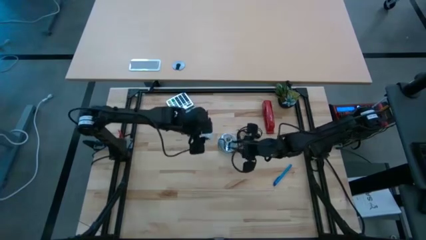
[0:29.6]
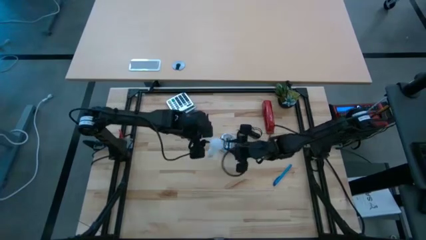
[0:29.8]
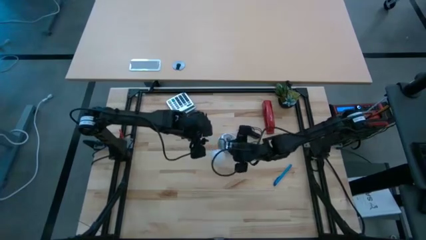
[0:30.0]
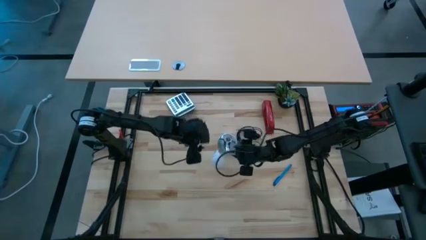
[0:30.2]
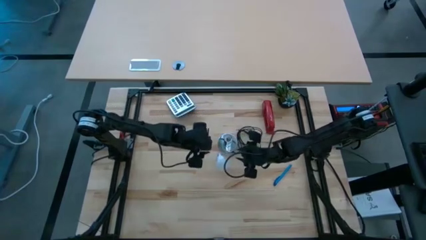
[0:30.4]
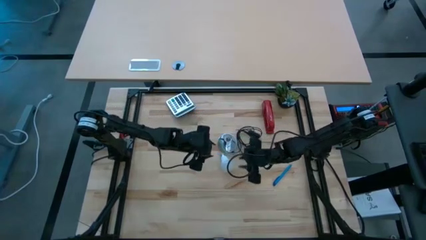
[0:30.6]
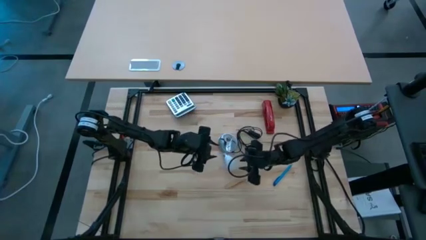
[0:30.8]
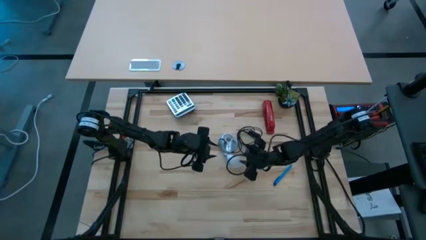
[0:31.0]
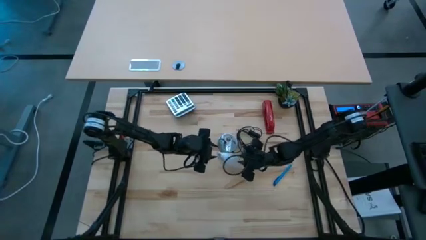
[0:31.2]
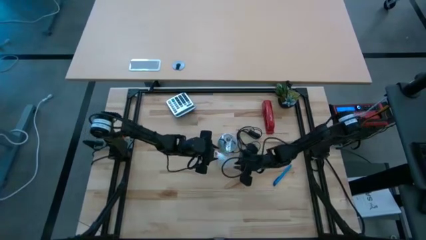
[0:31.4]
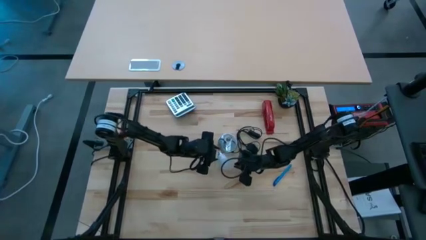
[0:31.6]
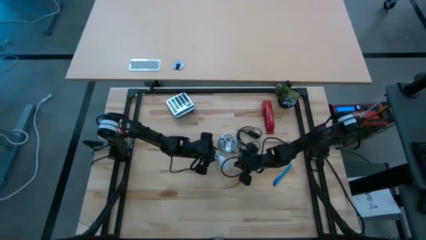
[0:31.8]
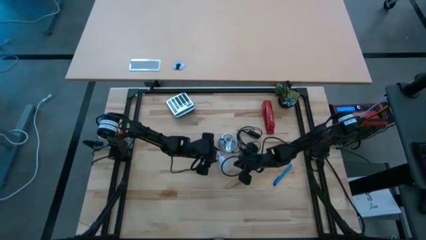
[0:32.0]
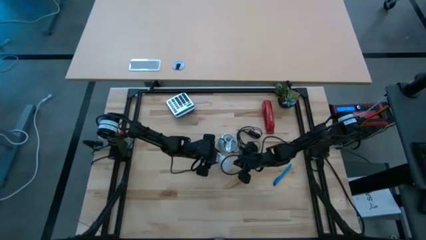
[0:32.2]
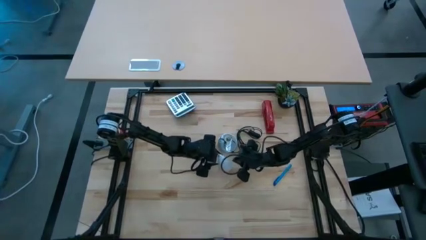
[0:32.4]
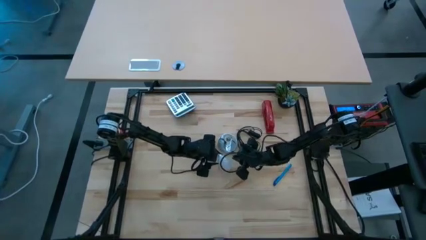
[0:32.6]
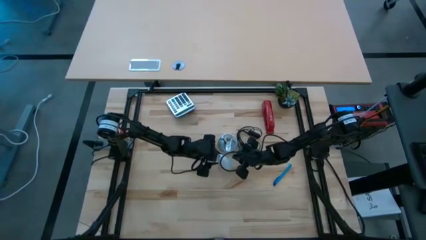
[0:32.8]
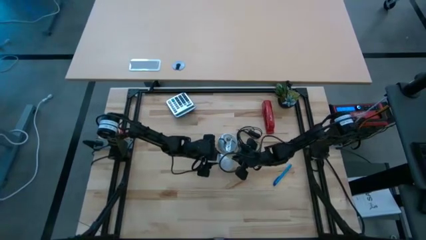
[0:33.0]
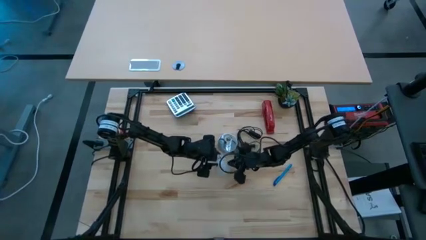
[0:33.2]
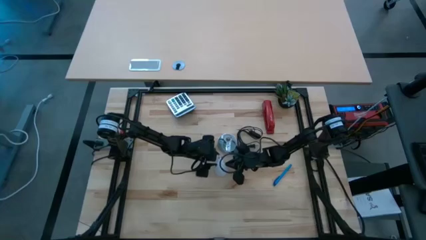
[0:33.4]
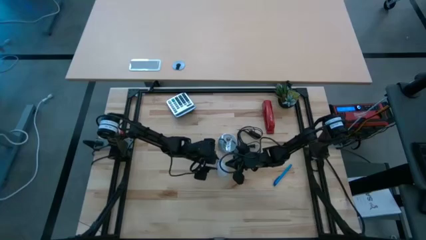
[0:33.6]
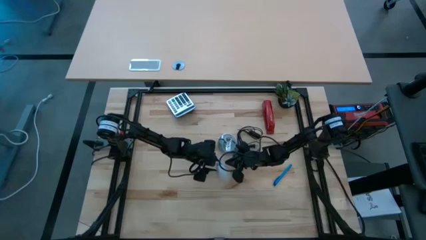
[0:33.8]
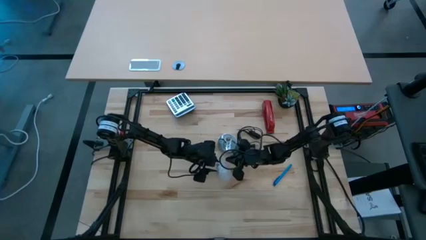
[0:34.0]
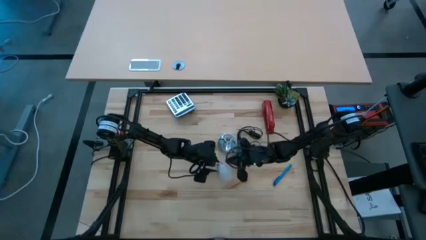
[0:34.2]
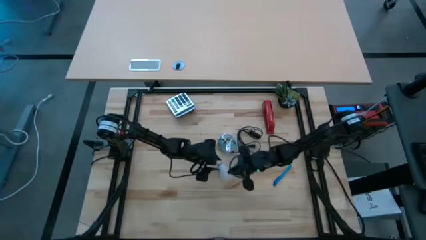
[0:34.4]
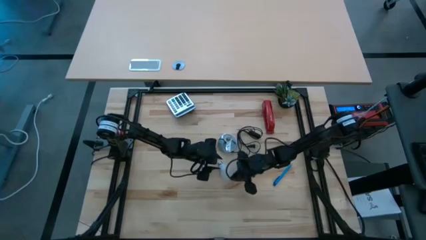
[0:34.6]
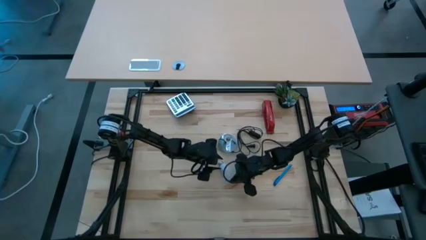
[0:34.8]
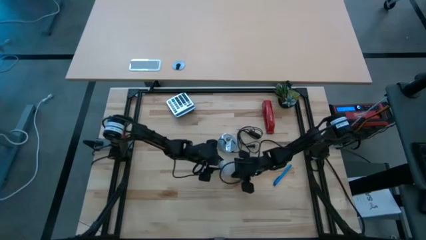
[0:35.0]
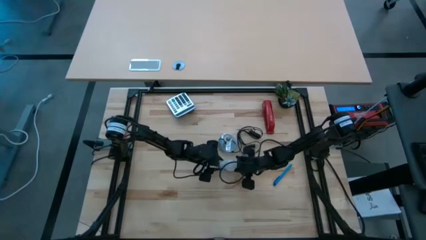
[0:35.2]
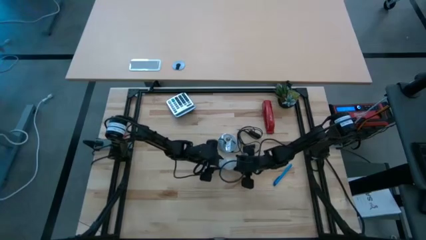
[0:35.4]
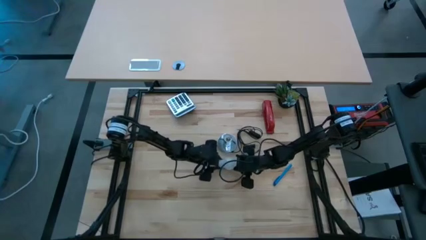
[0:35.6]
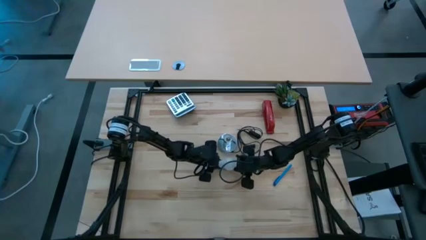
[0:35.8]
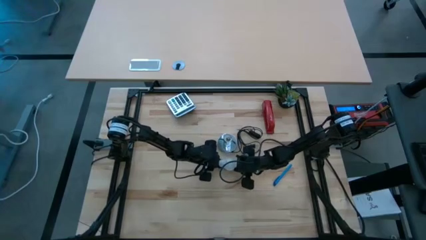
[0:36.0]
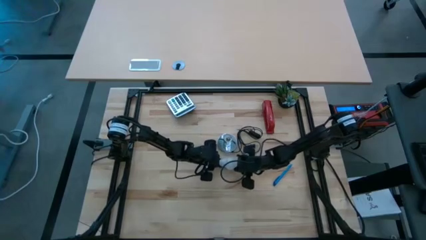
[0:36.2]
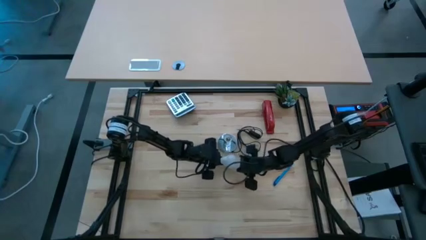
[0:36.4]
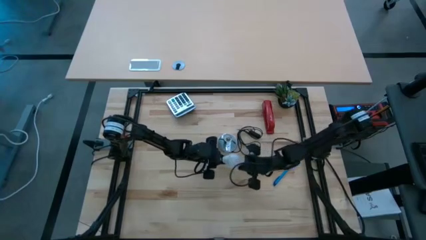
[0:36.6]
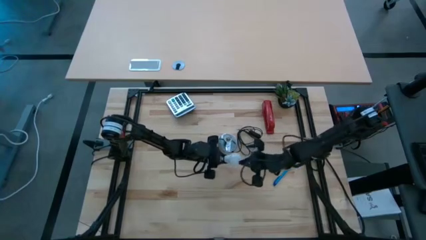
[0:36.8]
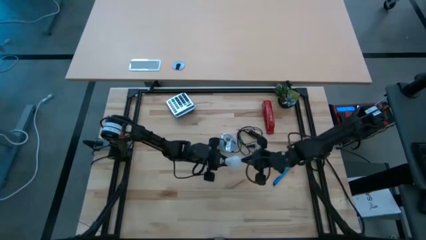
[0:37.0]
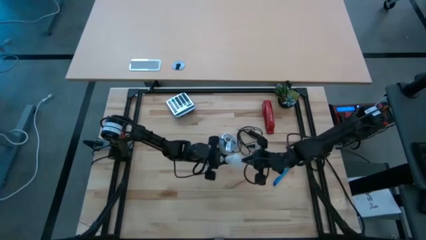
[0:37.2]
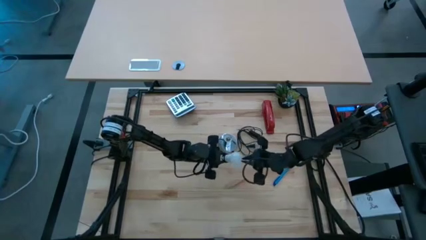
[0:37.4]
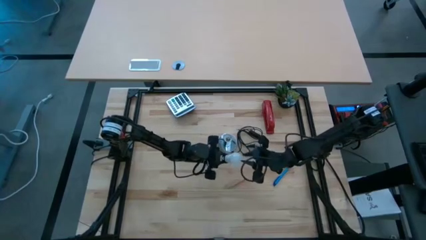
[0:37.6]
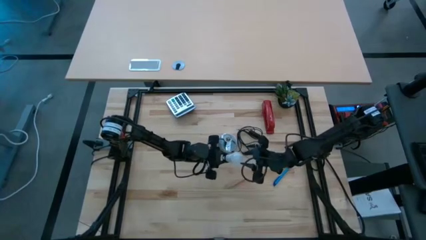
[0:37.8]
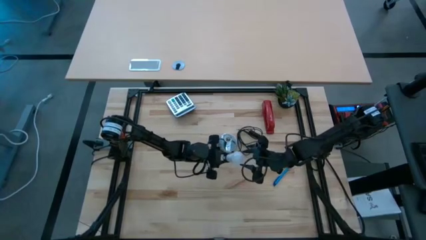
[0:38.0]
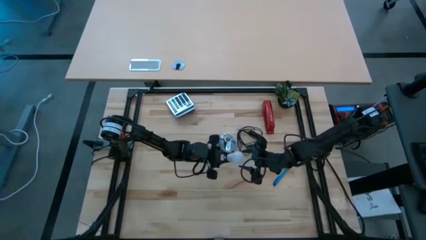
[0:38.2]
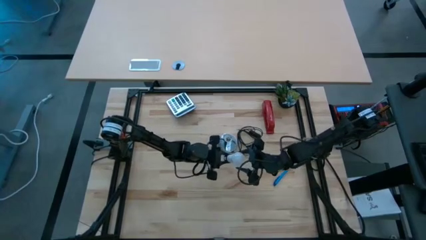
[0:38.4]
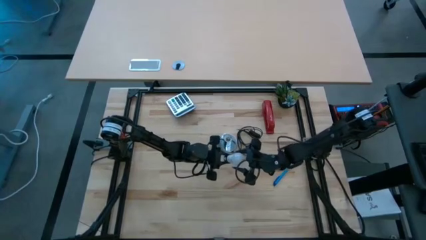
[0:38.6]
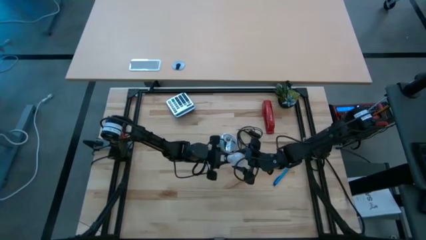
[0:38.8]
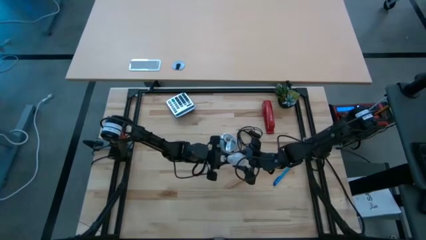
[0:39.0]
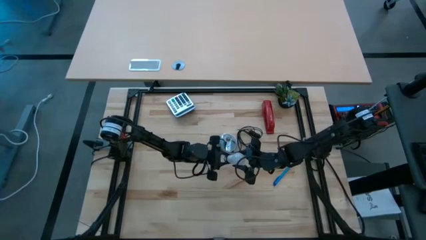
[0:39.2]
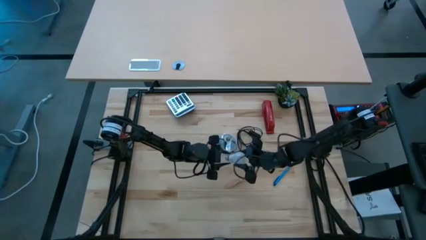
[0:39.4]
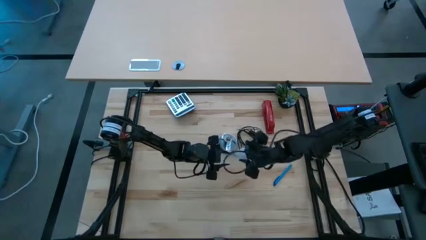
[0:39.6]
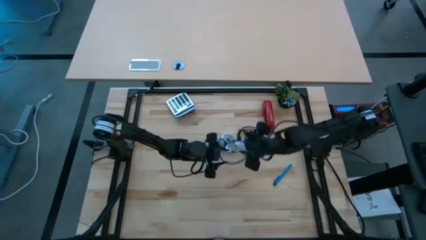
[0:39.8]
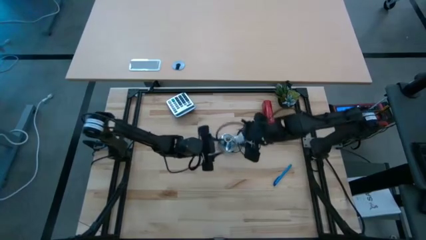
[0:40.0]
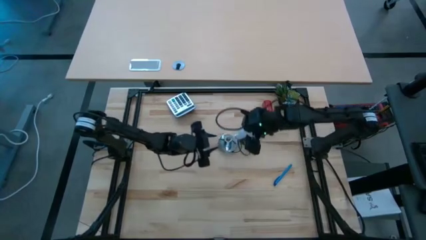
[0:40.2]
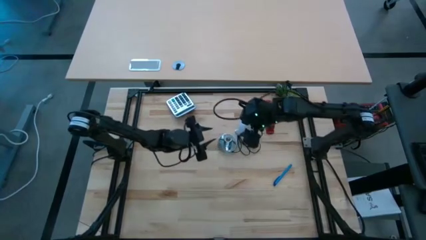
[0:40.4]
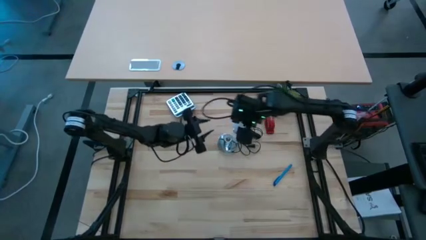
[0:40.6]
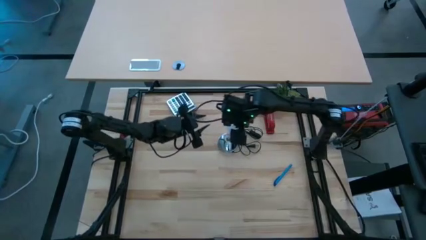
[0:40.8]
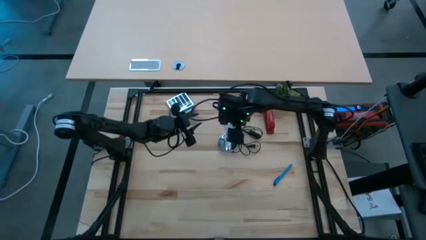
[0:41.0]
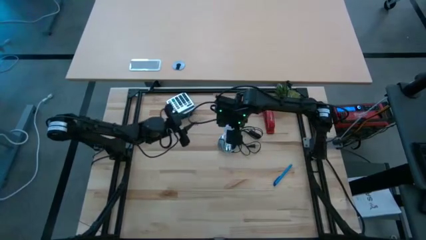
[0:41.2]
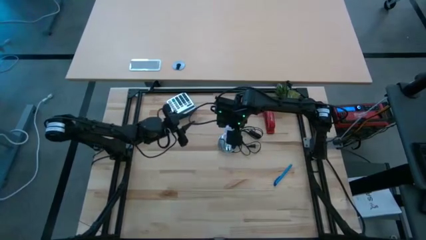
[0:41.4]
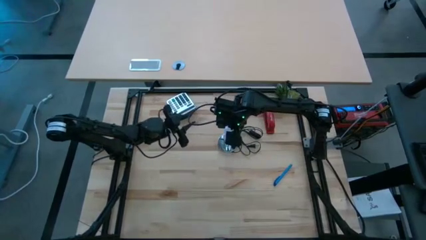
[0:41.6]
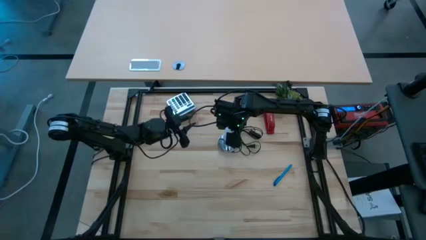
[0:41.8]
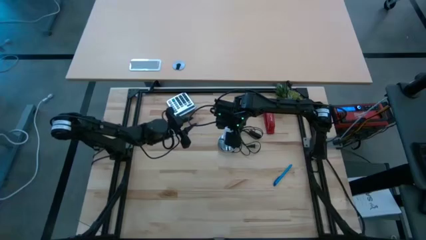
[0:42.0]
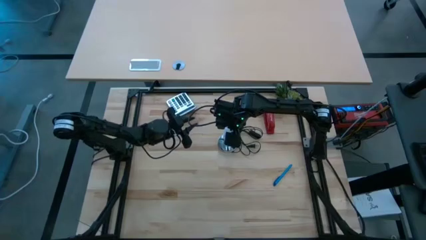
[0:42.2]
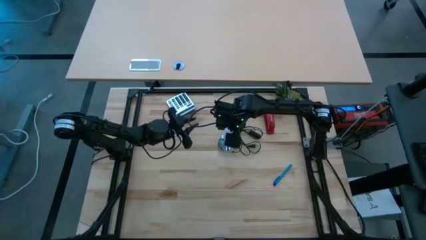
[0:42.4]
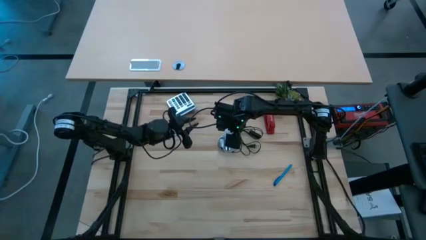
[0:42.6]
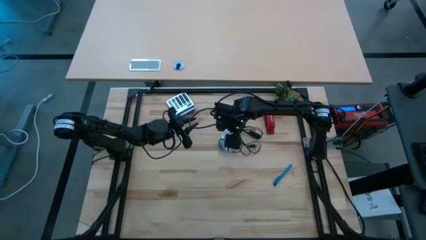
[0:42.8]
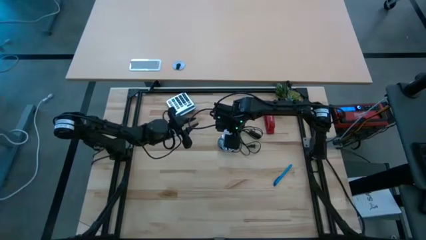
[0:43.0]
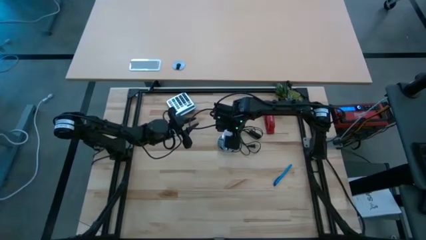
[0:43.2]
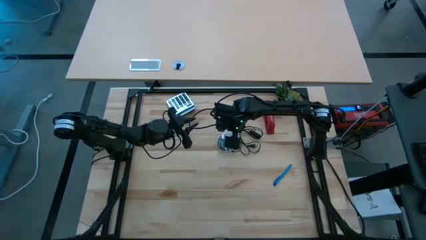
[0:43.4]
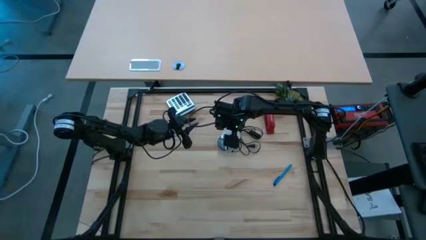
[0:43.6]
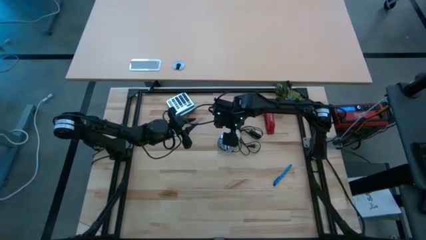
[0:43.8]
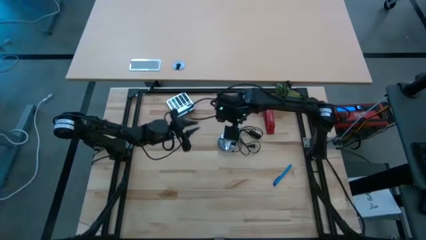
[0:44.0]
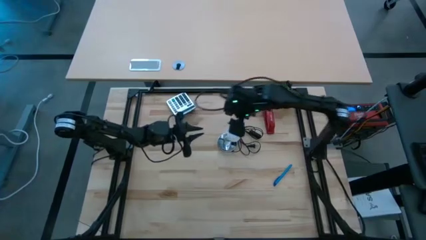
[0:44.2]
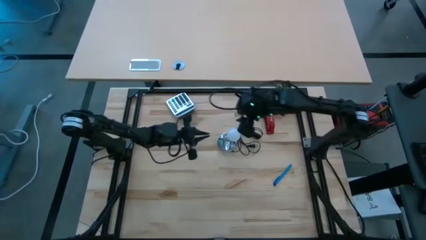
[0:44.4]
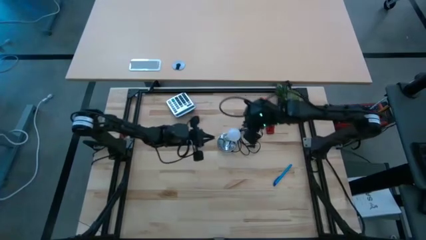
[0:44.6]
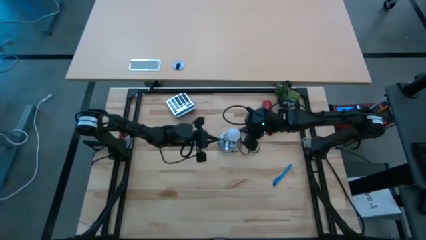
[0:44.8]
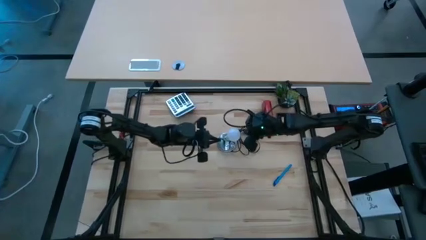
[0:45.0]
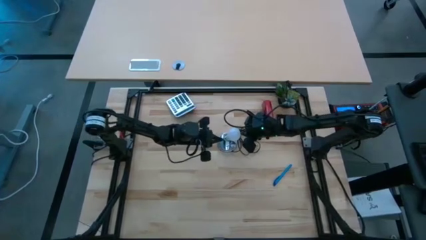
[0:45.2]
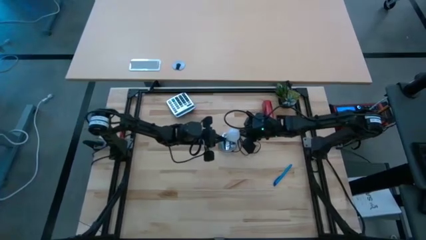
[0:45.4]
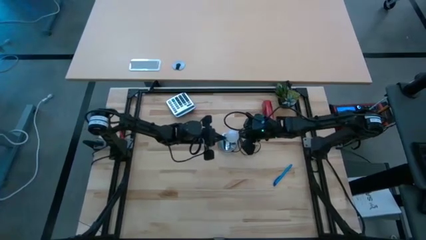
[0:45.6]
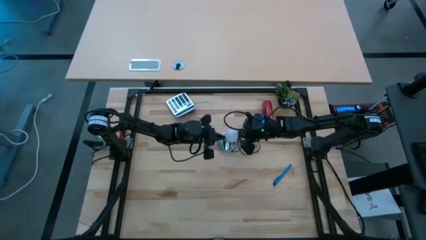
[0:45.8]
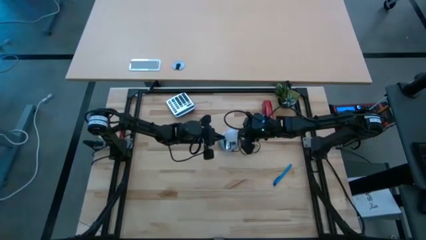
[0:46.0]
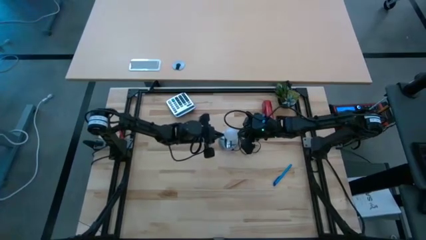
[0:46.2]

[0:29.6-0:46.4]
Task: Screw lightbulb
Insert the white lightbulb into the silver lamp
